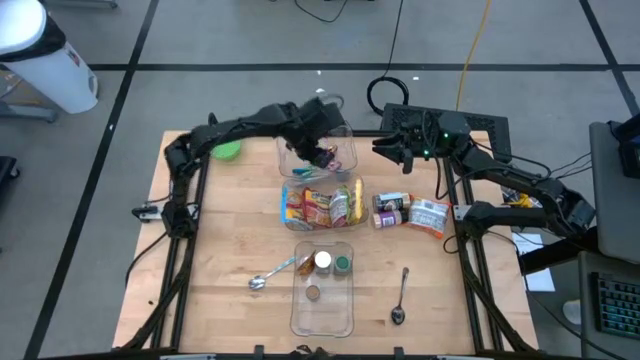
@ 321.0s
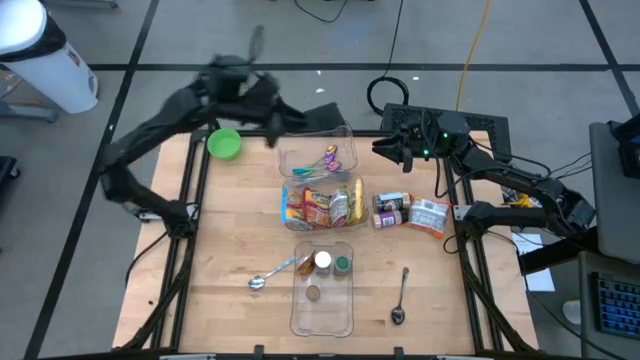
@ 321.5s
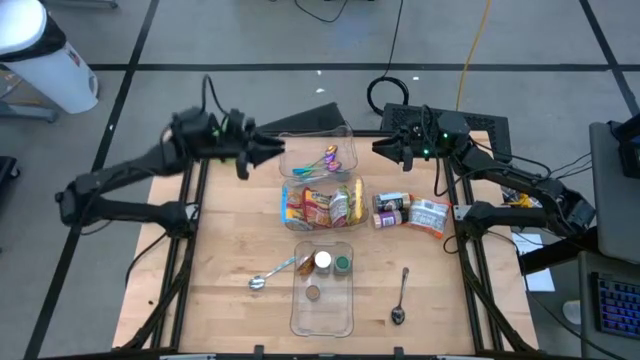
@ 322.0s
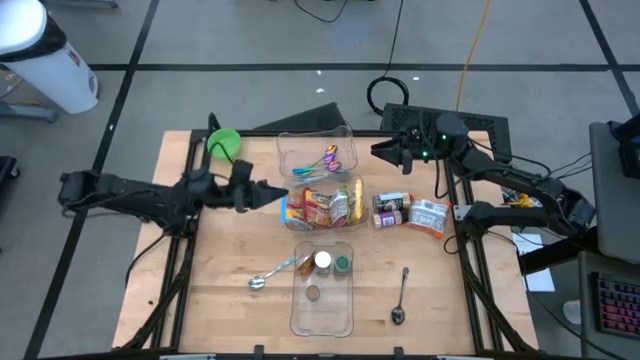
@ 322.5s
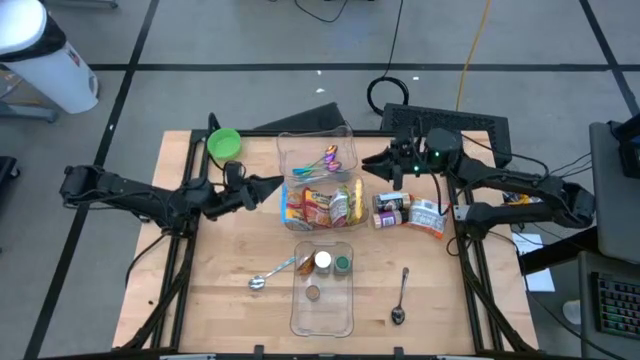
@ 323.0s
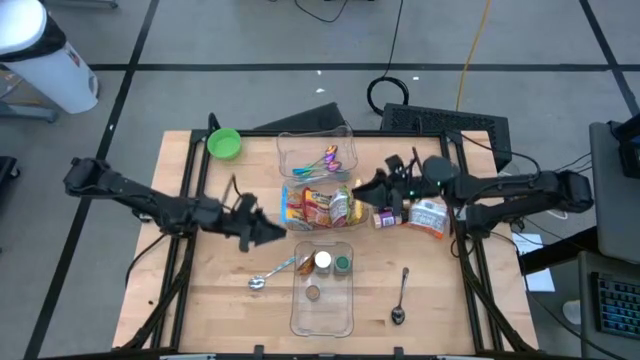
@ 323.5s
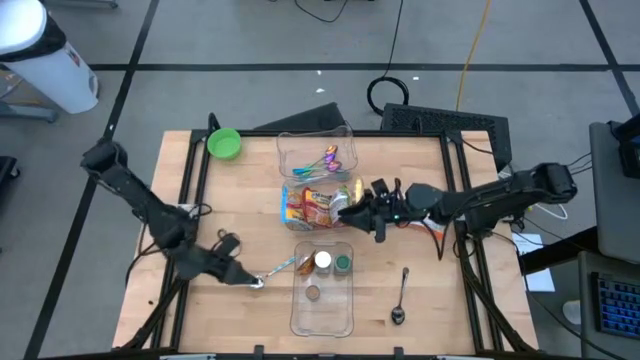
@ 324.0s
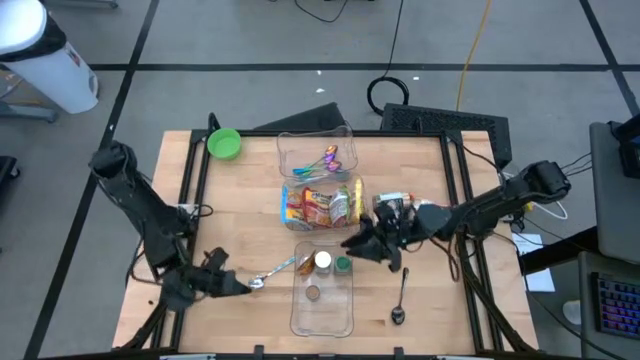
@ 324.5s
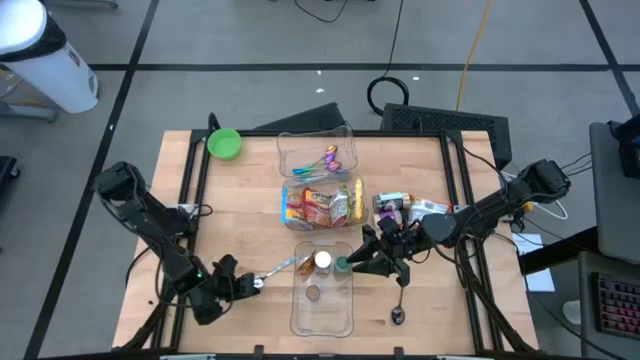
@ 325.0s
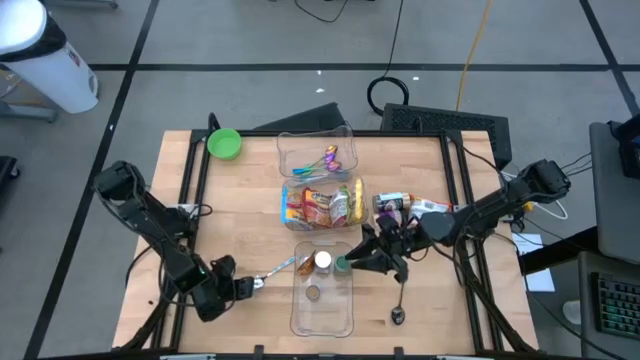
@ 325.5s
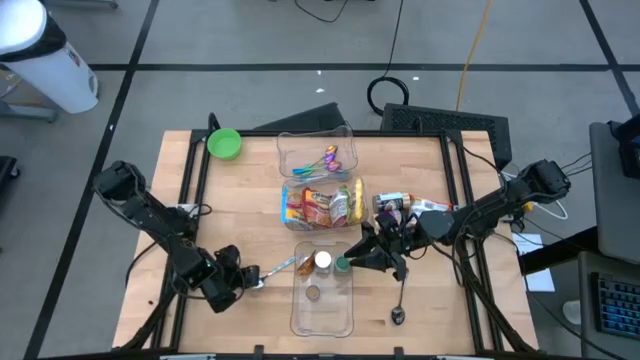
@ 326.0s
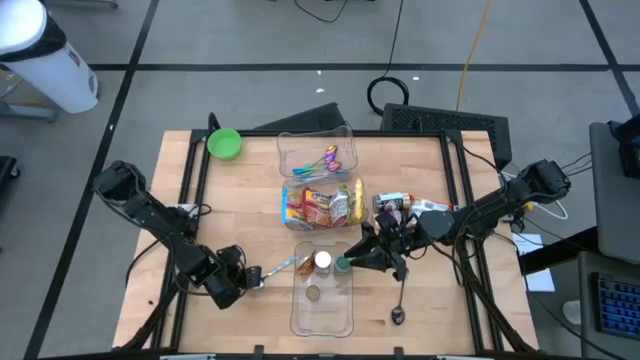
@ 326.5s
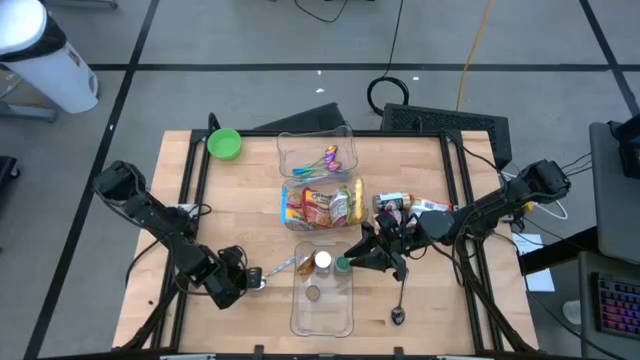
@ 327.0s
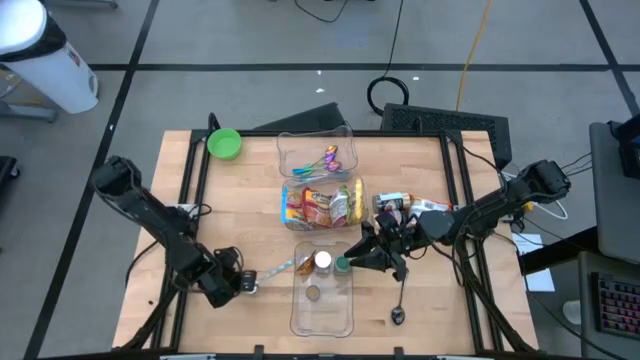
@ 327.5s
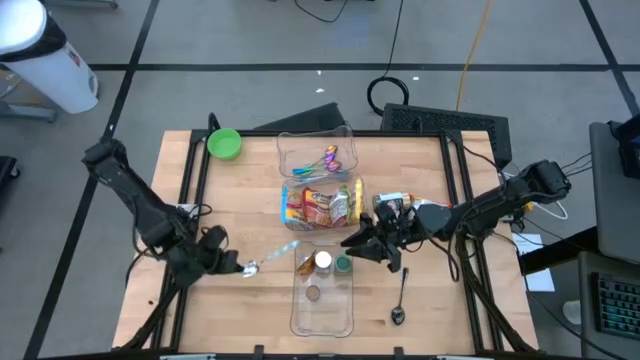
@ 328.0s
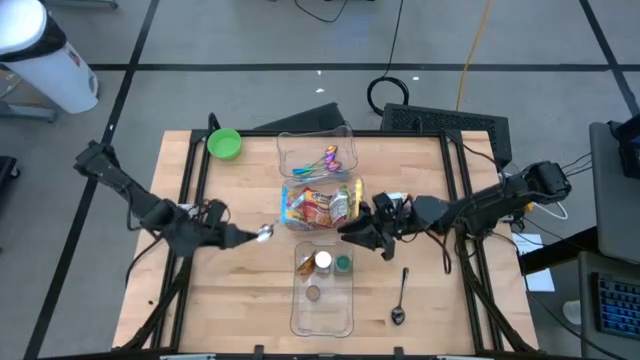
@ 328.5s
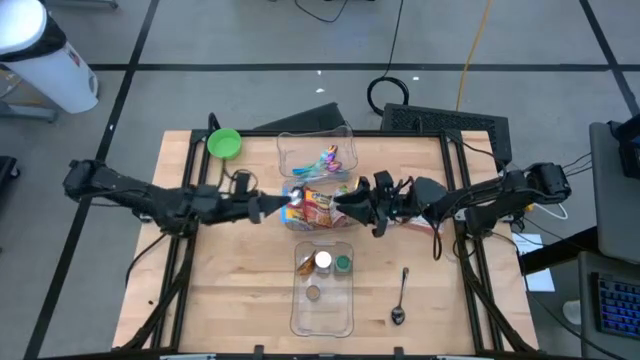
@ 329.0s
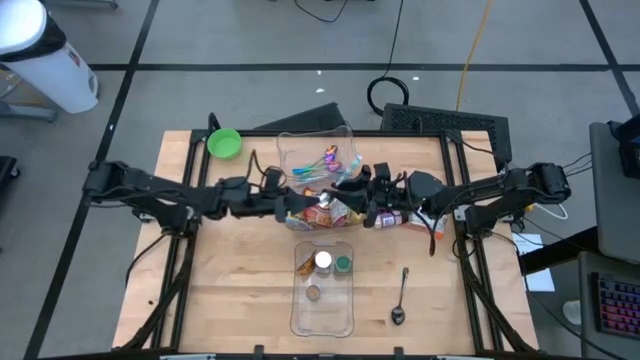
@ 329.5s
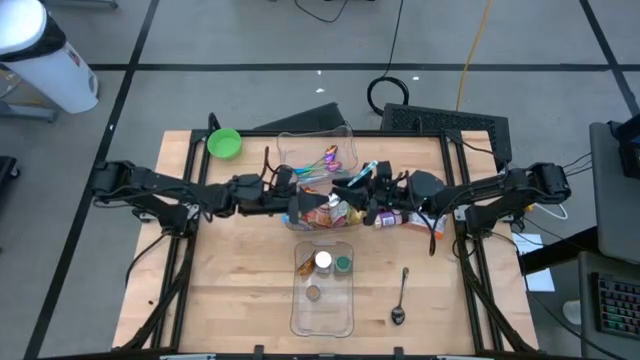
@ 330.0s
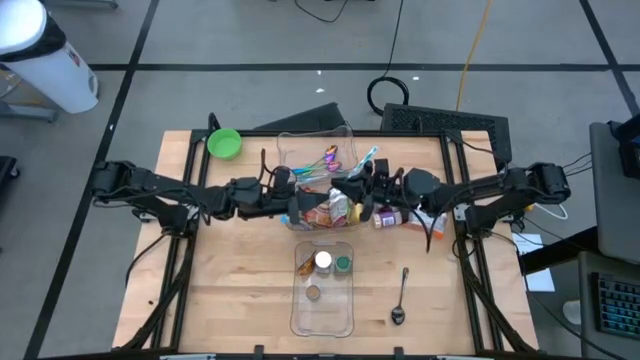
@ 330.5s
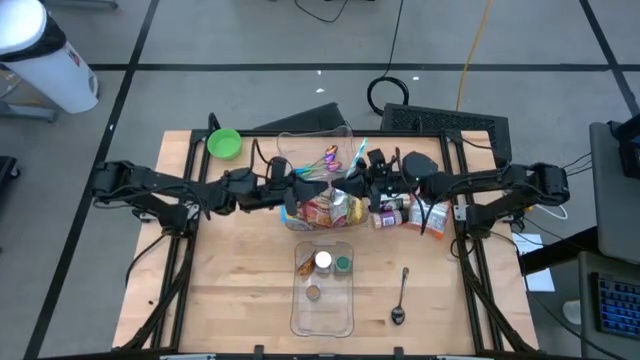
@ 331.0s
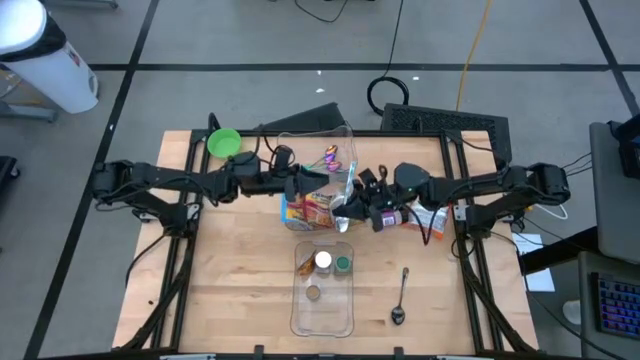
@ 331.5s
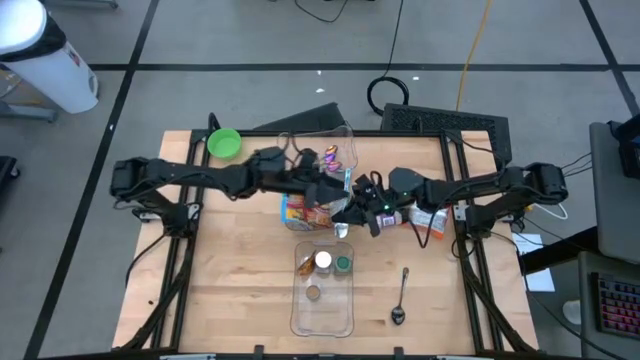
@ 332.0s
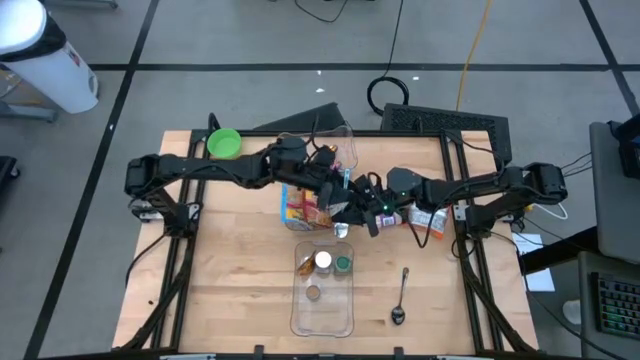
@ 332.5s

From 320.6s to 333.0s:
Task: Pick & Place Food Item
Put the blue patterned spoon into the top transparent bin

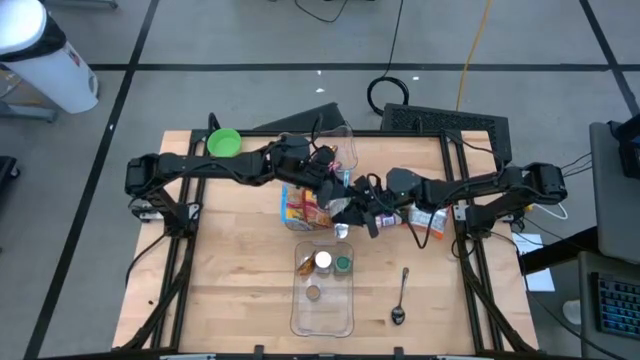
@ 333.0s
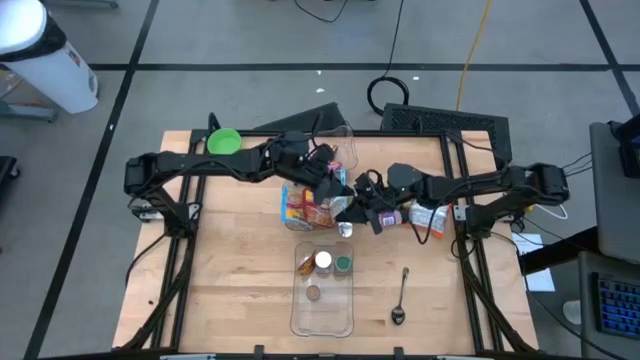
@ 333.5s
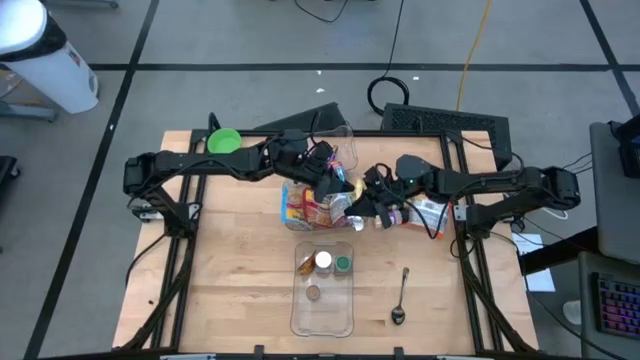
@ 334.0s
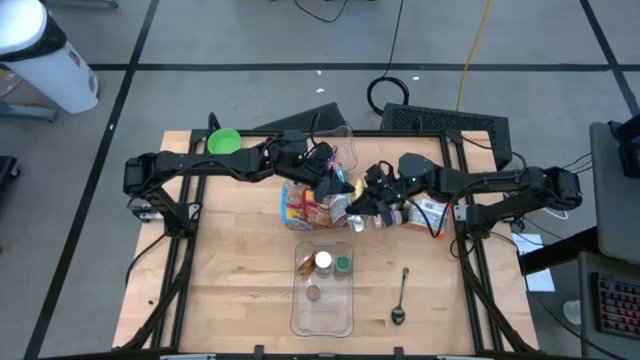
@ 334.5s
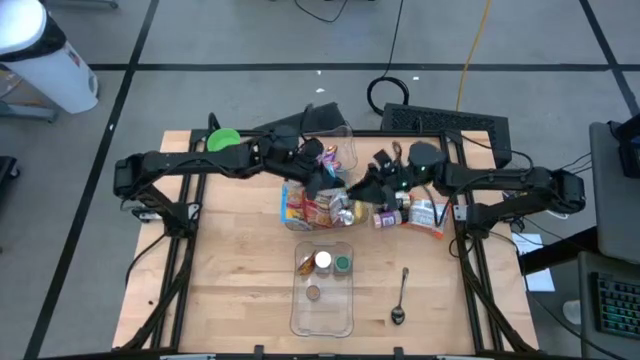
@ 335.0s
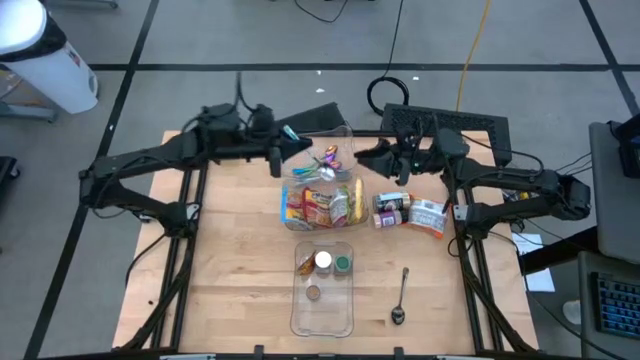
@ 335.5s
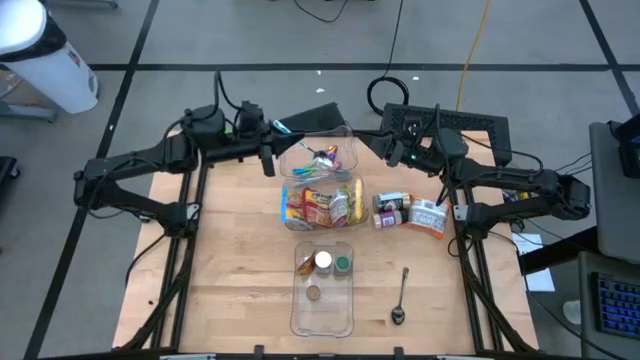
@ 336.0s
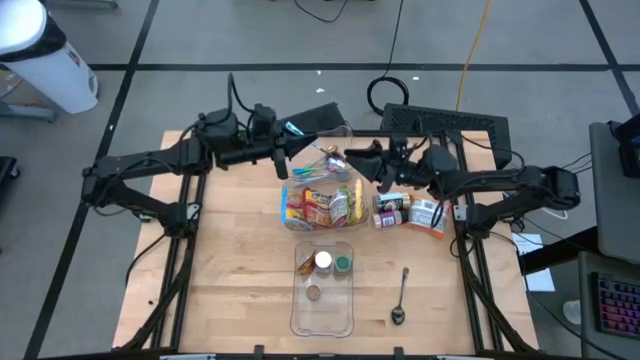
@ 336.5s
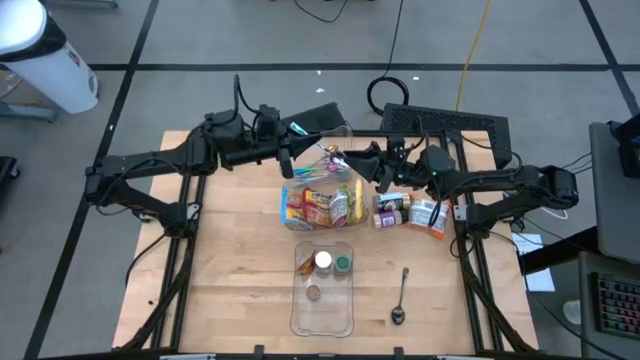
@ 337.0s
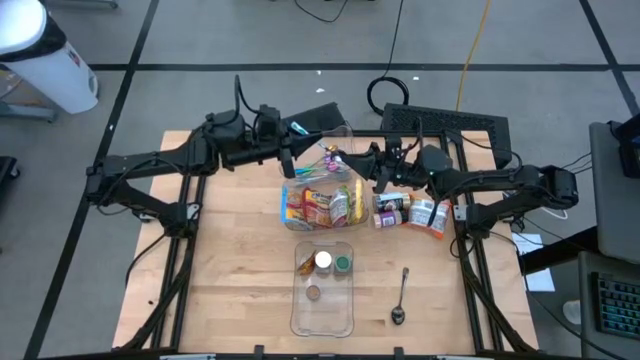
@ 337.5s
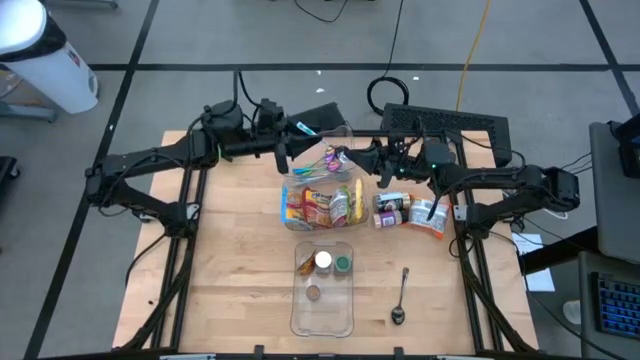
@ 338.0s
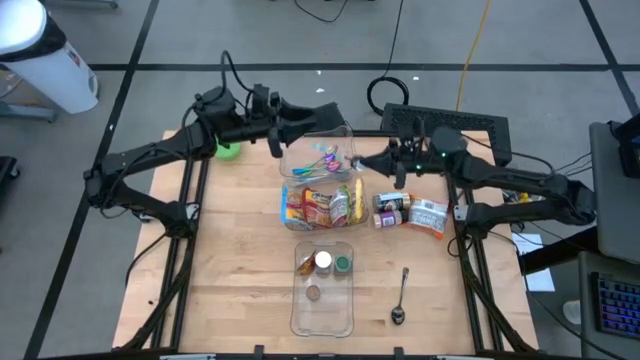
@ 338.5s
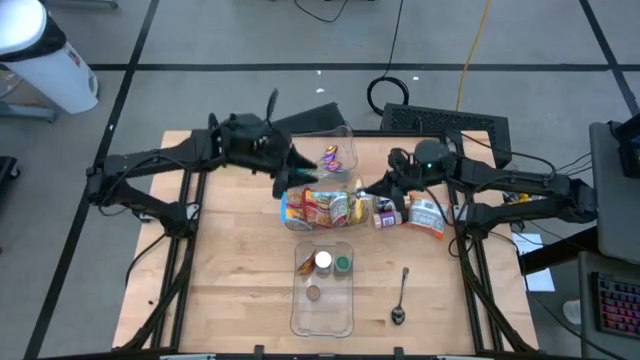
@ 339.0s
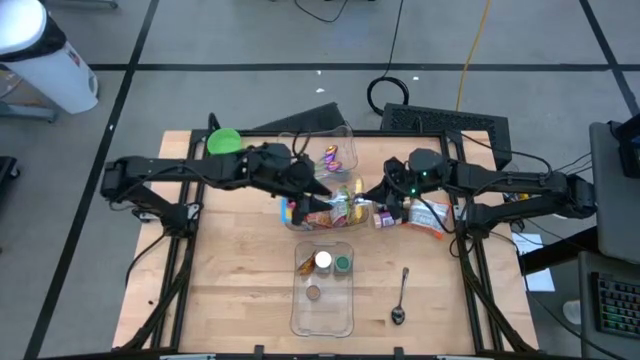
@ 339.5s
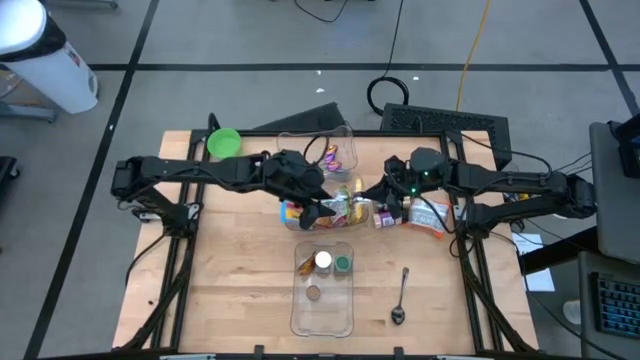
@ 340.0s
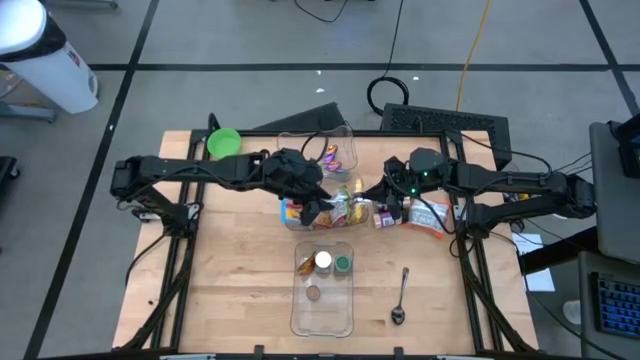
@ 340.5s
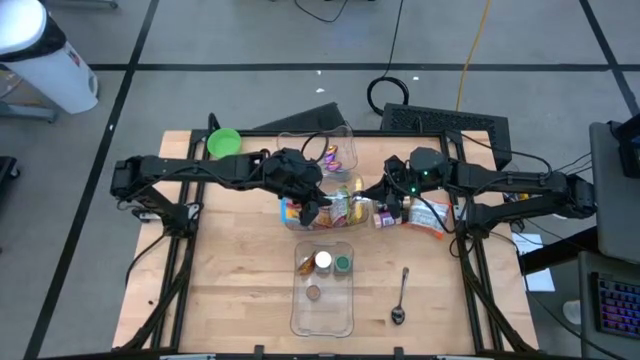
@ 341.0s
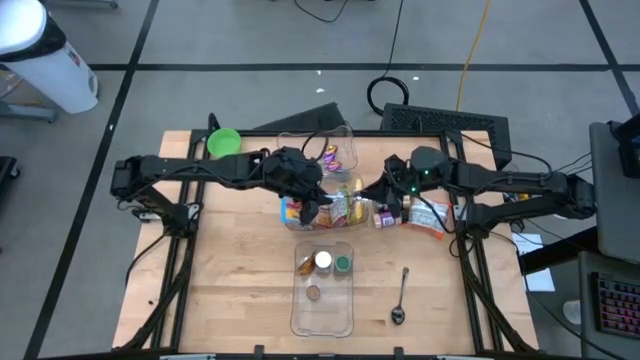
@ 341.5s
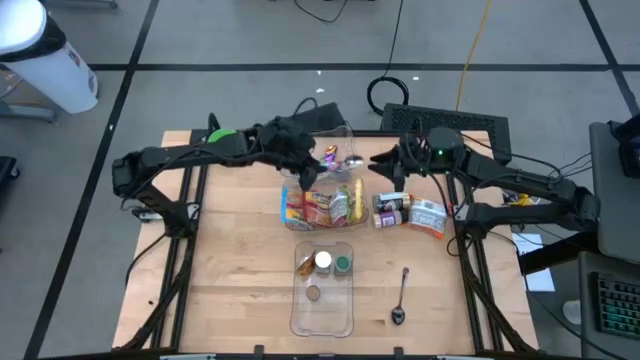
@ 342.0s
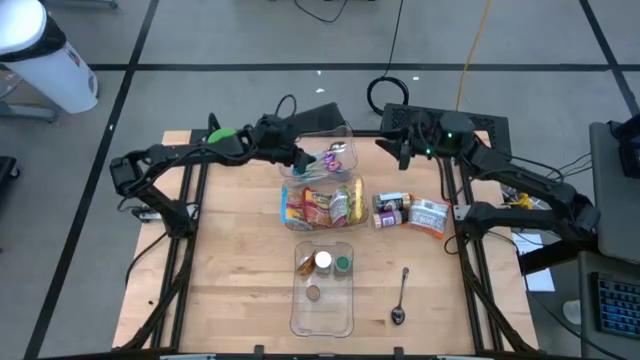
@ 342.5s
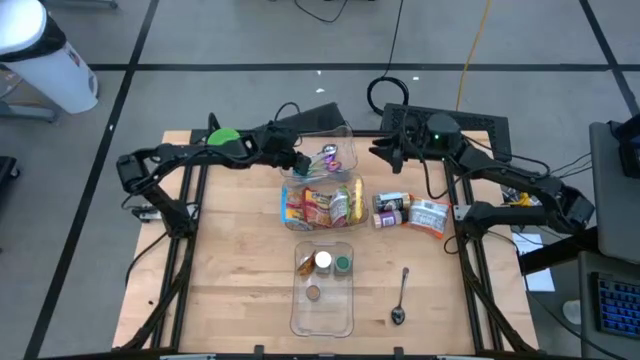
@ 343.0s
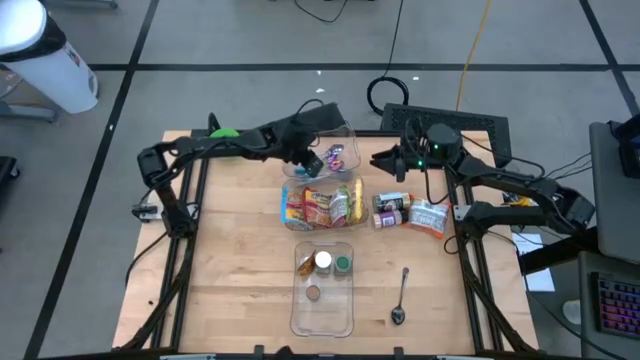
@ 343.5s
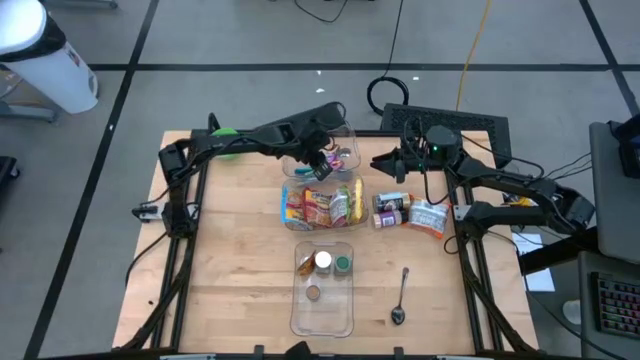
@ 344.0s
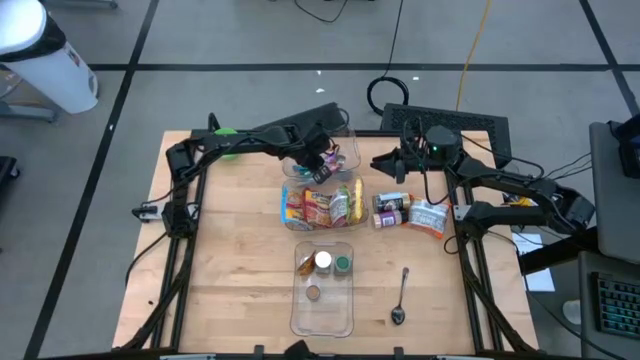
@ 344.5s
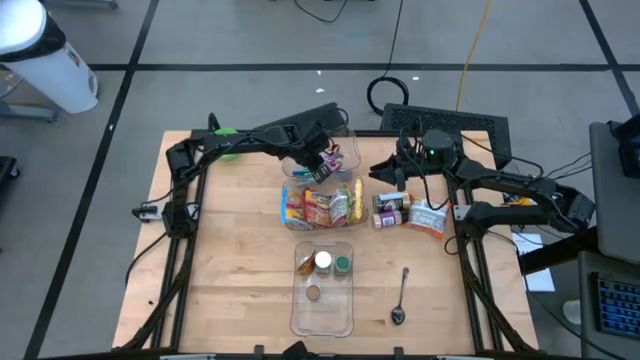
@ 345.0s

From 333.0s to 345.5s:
Put the blue patterned spoon into the top transparent bin
